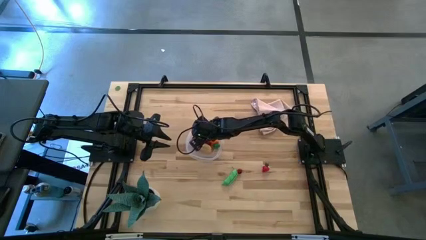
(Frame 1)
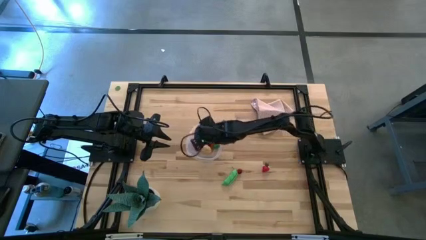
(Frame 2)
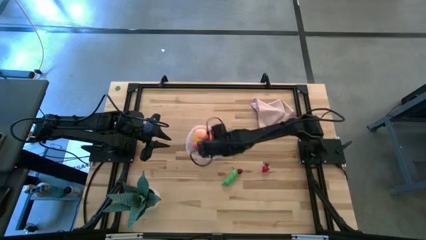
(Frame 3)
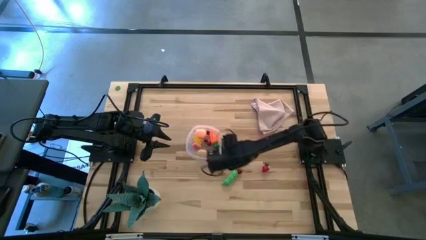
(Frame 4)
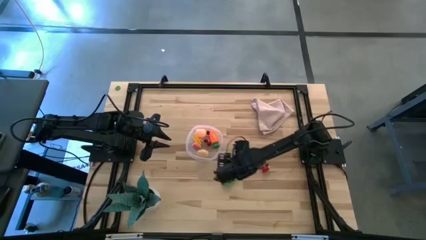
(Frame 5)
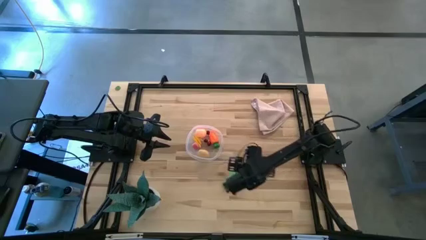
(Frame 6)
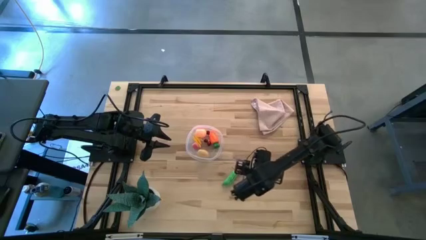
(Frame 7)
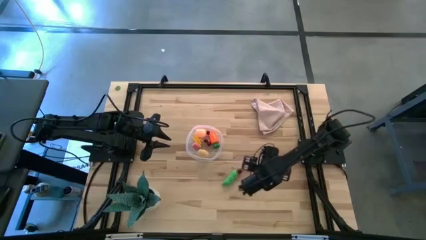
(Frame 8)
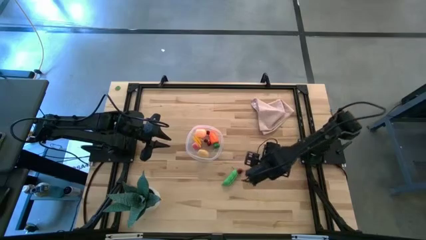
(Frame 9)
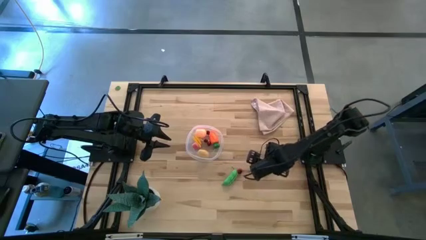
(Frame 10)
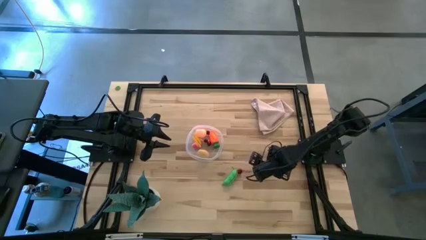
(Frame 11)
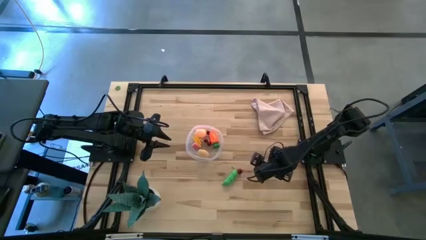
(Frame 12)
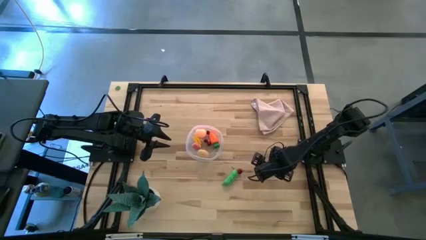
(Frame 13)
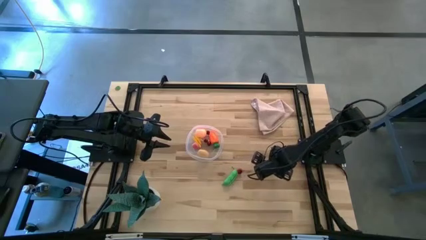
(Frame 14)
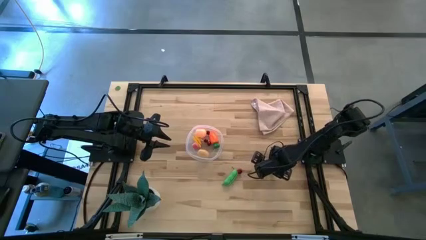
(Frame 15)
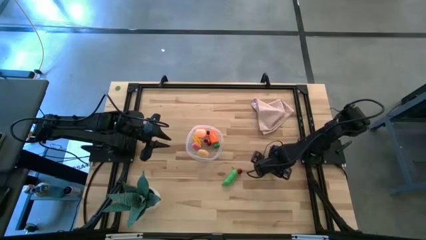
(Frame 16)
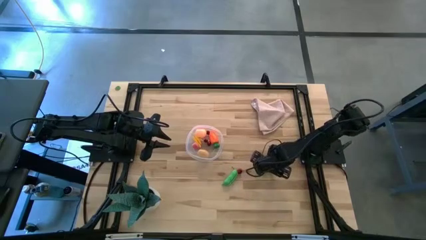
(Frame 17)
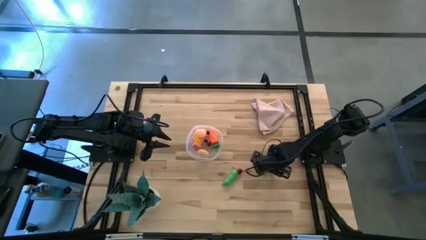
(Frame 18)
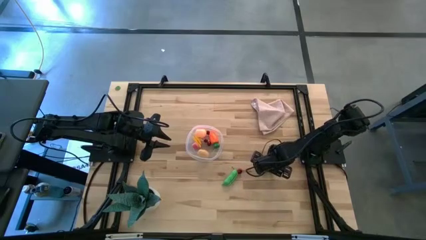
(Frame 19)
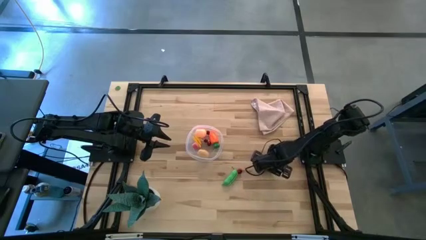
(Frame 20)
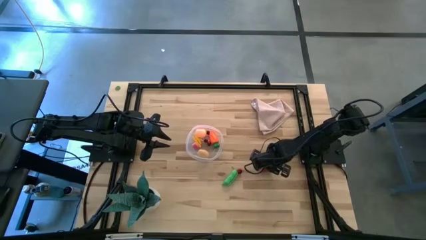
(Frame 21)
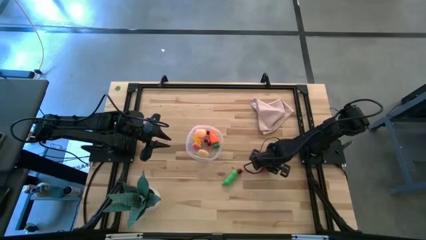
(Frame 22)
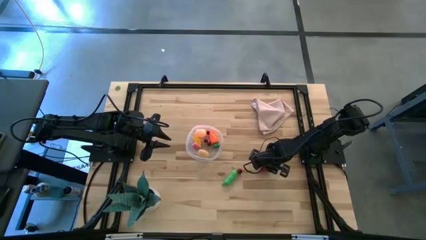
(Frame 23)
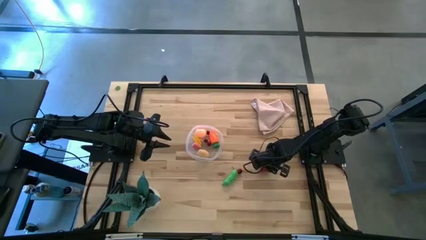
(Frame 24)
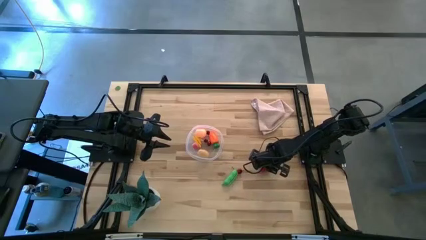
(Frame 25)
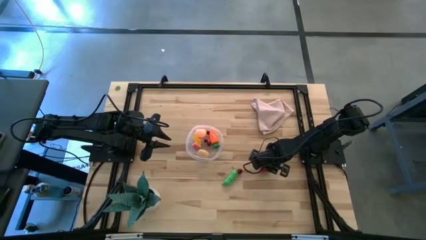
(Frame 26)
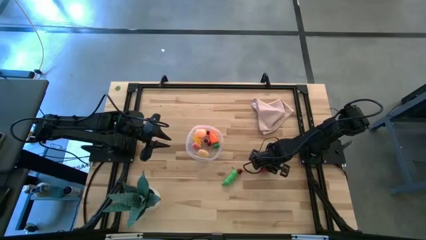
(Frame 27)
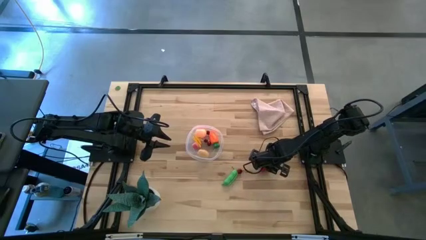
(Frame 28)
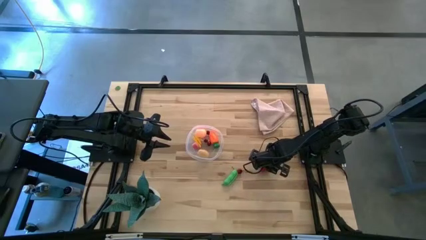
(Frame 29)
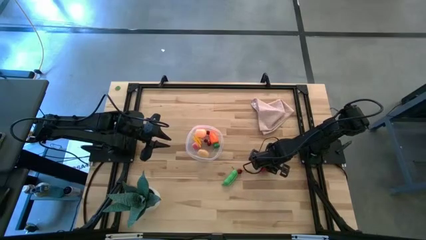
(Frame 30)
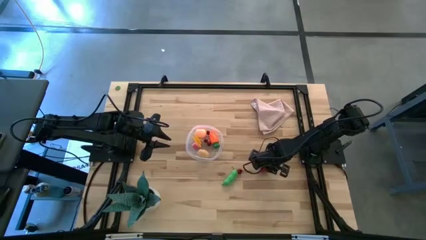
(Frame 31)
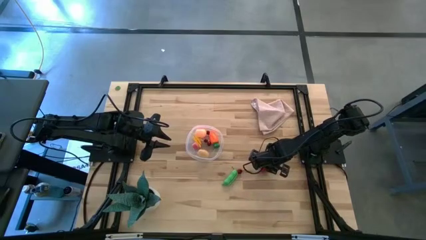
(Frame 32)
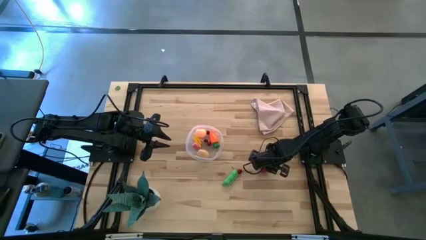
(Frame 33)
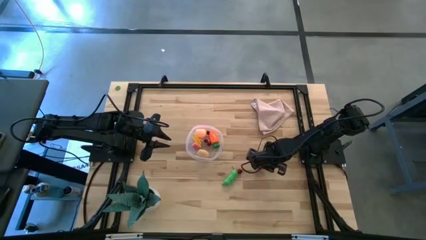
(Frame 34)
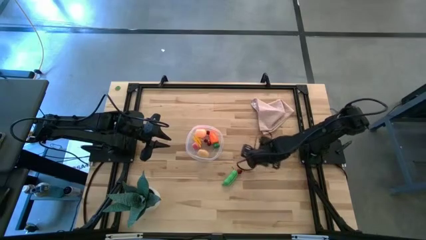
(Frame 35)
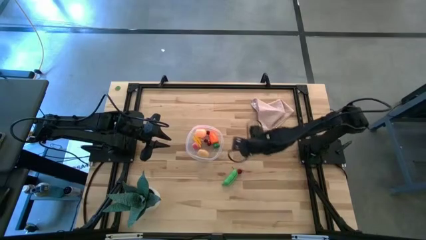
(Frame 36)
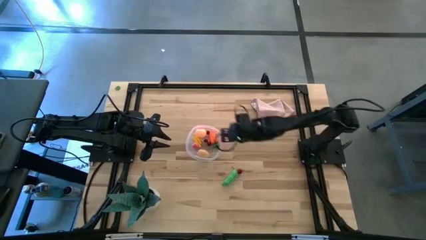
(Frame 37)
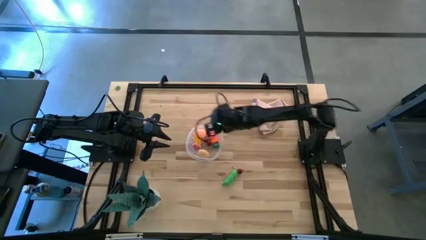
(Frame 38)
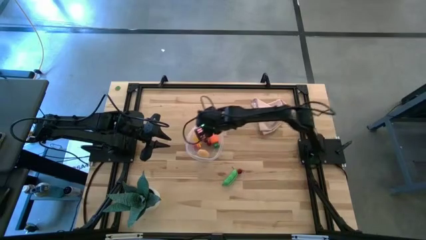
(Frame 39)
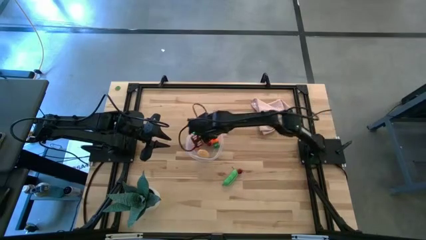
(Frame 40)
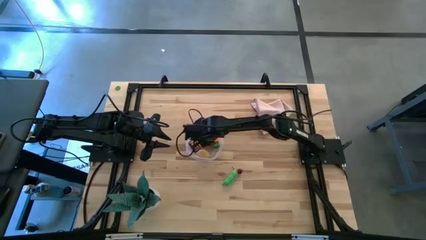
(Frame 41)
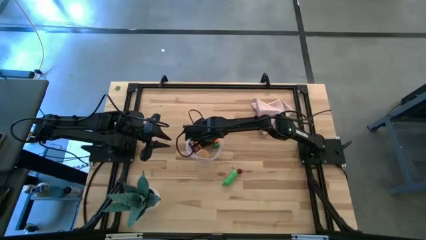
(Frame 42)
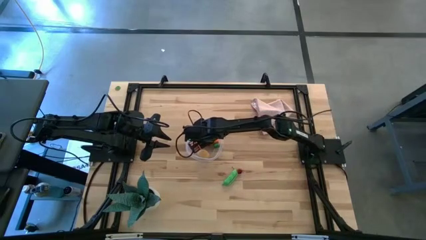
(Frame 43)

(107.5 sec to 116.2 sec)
Task: Pick and placing Produce into tupperware
Put the strawberry into the transparent bin

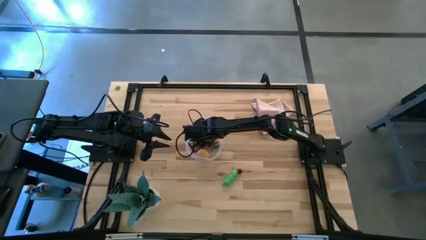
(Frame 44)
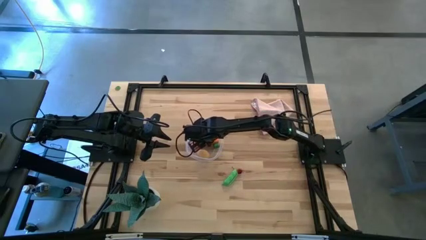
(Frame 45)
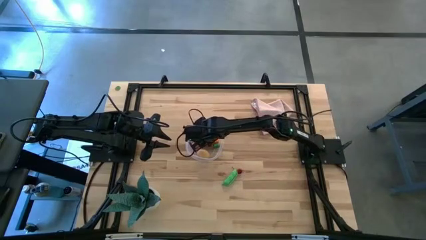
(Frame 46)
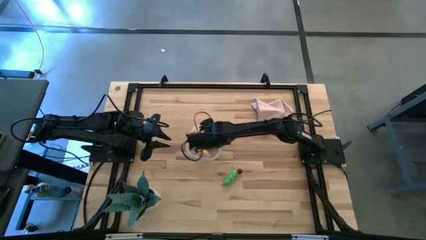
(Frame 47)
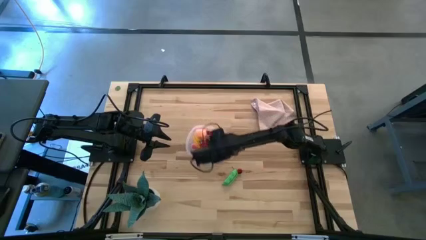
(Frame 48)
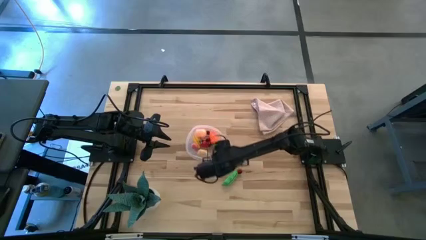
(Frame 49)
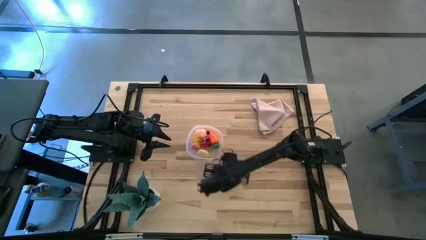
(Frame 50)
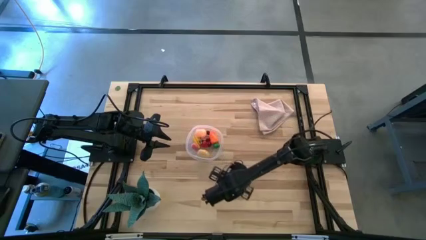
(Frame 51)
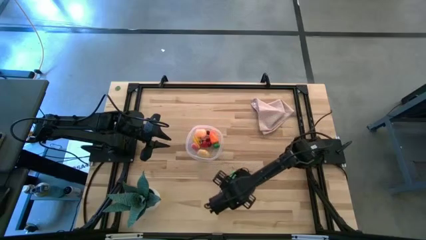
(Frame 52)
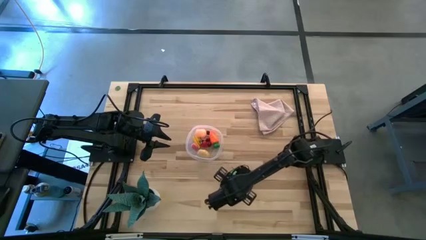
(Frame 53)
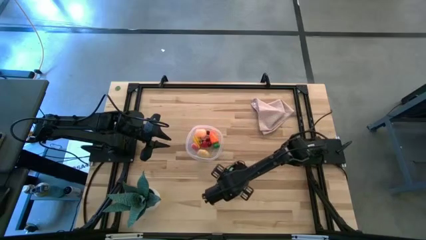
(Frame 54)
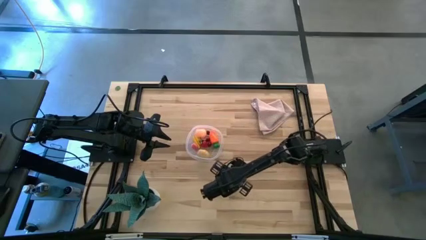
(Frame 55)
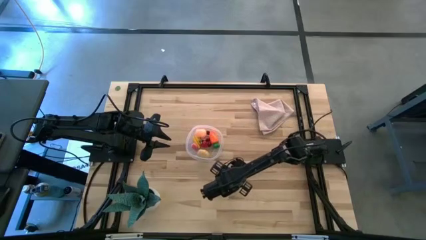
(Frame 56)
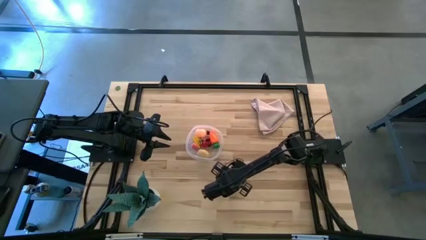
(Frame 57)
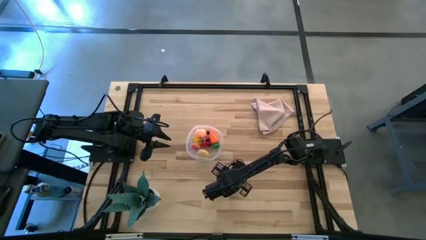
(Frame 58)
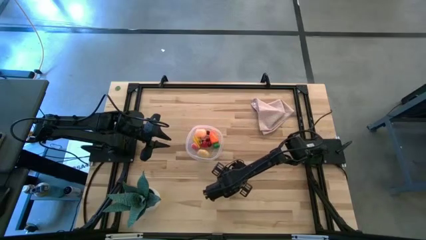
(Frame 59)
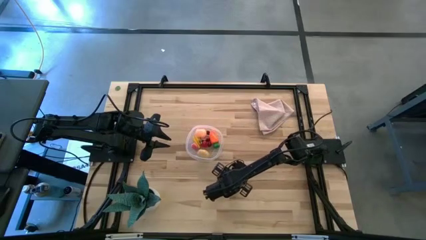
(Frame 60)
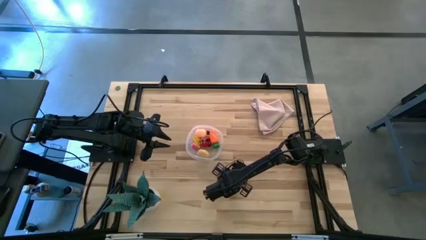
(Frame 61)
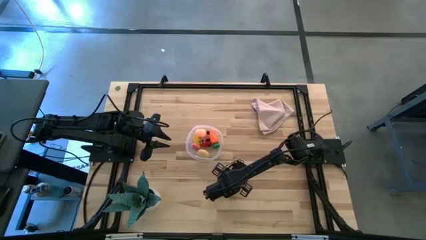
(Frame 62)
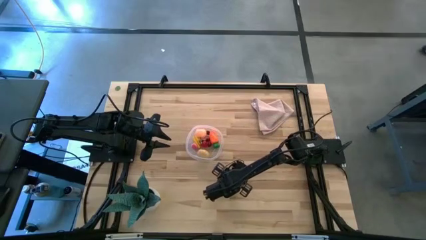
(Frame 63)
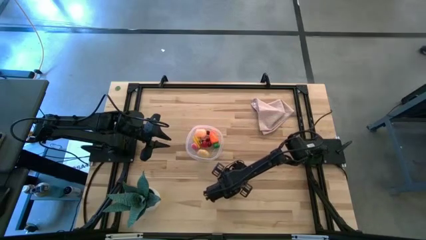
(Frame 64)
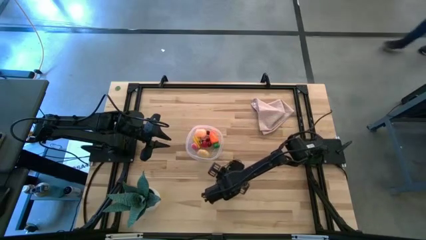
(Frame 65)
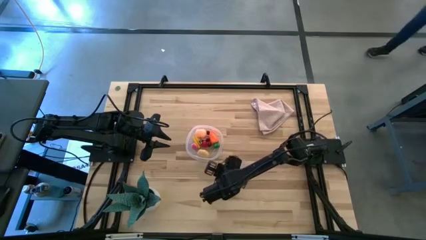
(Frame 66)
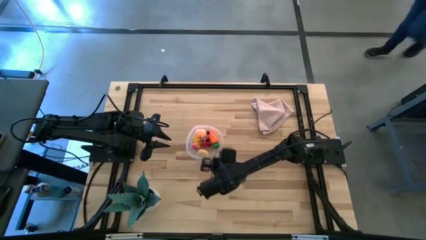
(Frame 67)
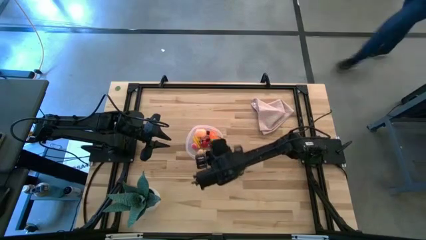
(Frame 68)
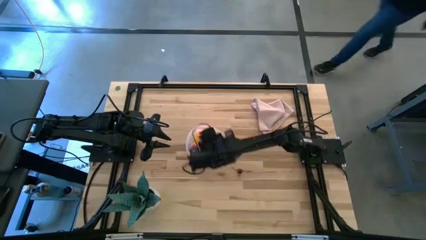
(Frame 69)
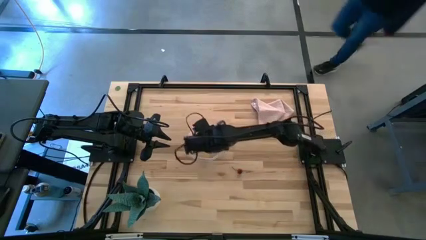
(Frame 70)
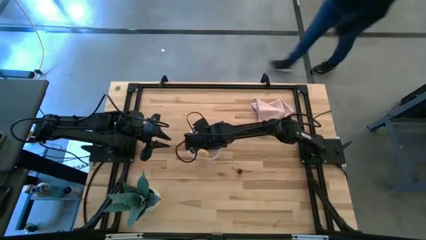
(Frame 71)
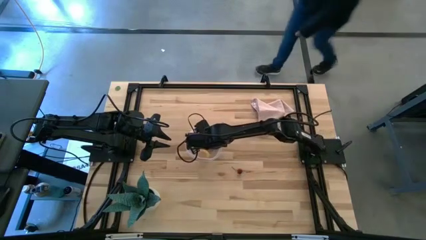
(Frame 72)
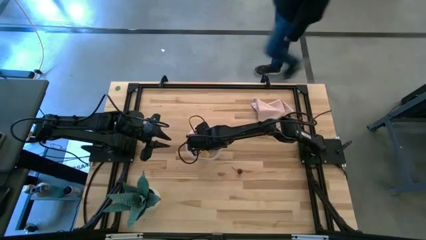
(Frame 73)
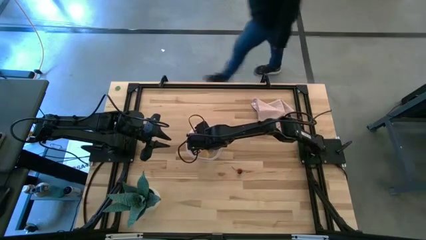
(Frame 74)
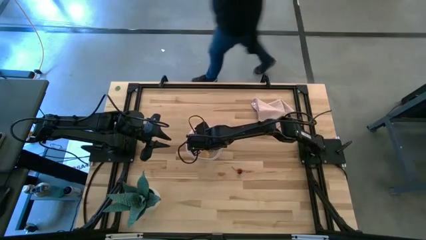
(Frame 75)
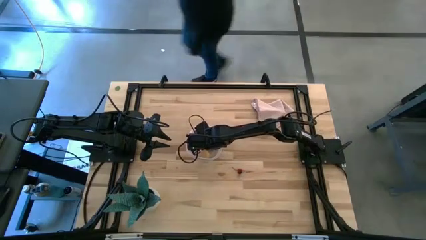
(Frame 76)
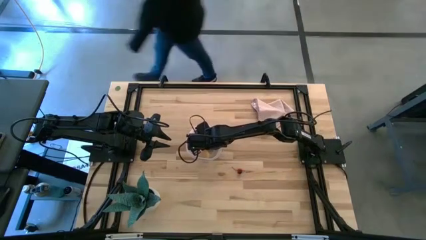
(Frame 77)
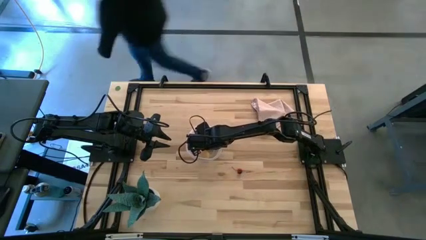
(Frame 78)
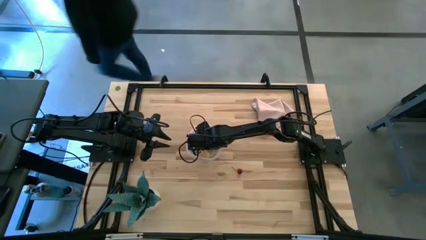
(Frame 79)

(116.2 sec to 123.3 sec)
Put the pea pod into the transparent bin

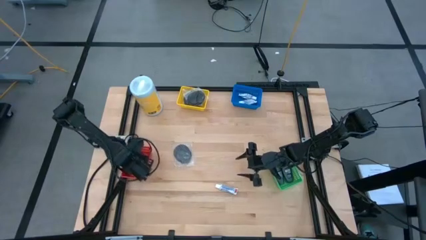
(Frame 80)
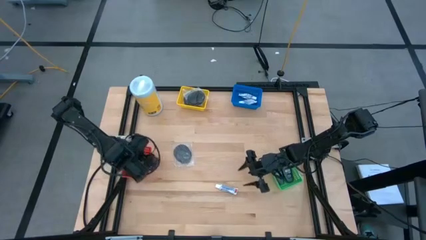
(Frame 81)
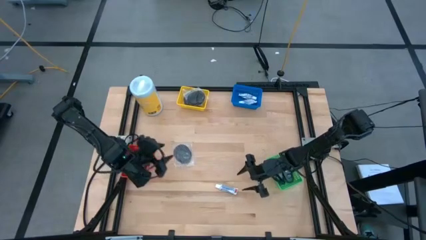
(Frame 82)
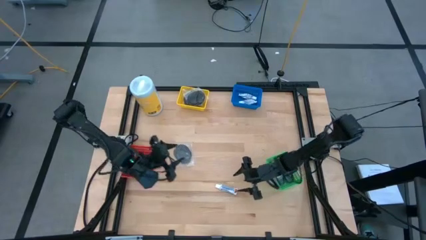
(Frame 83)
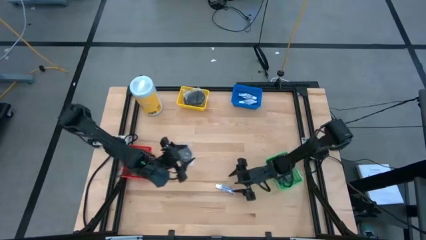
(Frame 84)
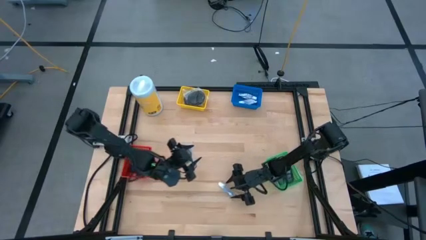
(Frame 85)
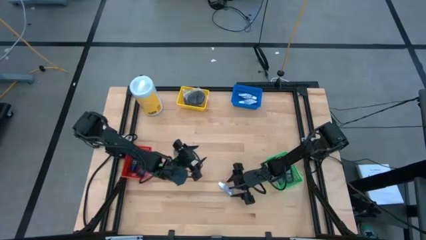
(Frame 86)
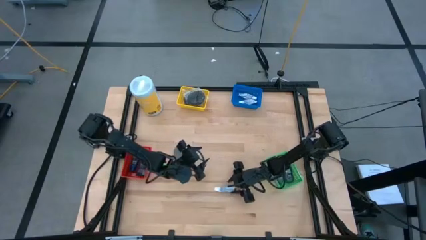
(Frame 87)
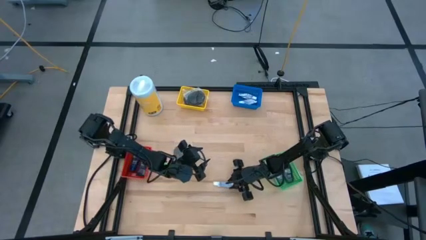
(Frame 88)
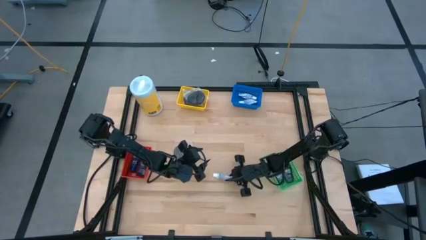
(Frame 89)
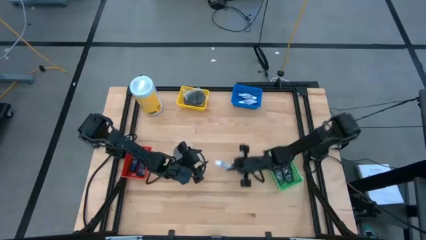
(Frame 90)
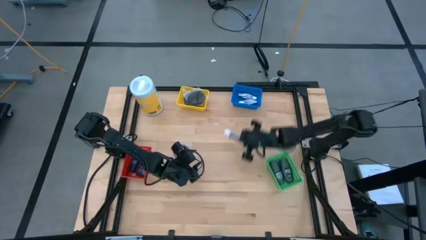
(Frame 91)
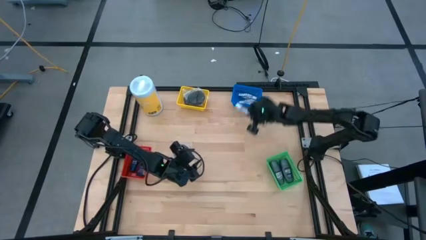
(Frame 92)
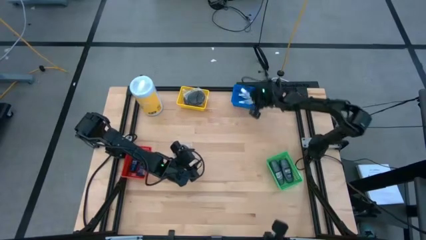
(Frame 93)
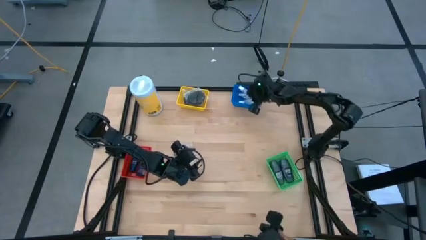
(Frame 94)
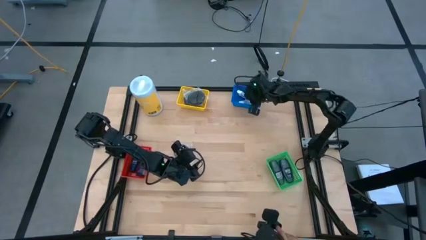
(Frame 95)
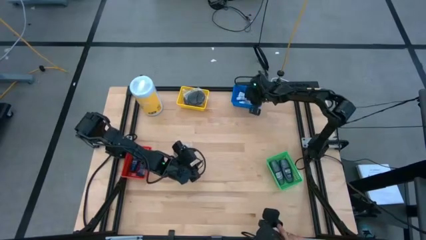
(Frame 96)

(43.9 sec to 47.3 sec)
Task: Pick & Place Travel size toiletries
Put the purple toothpaste into the blue bin
